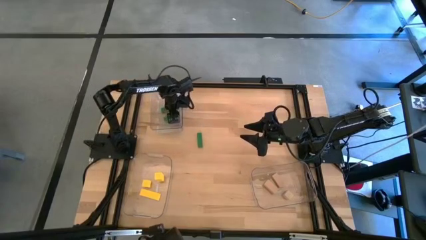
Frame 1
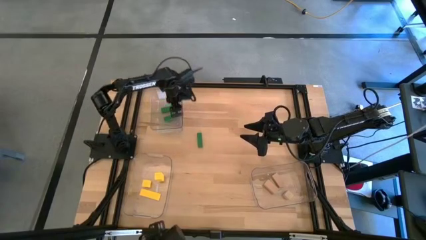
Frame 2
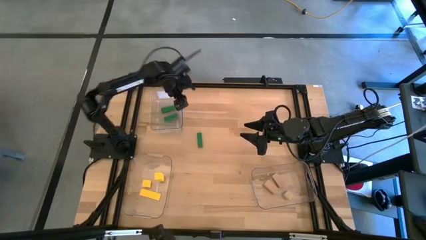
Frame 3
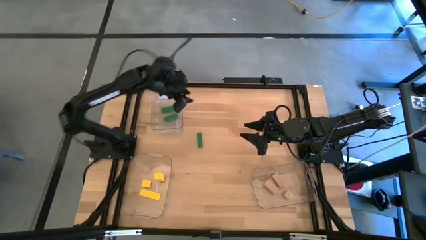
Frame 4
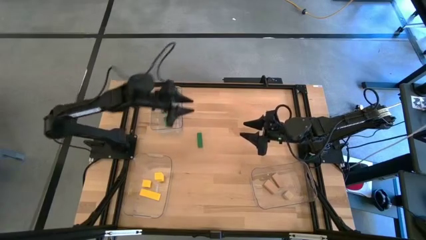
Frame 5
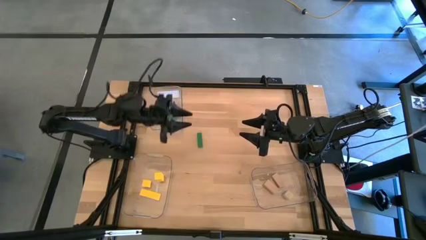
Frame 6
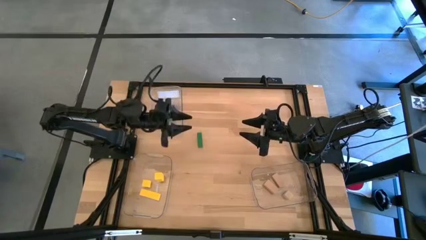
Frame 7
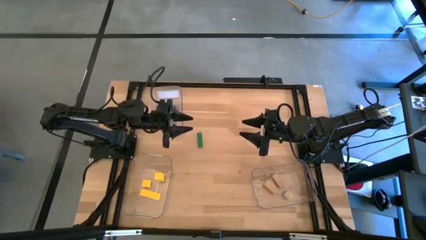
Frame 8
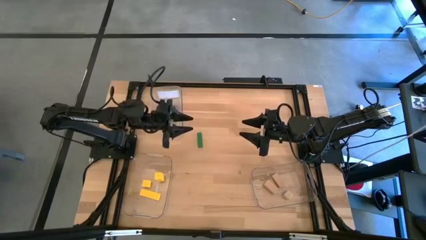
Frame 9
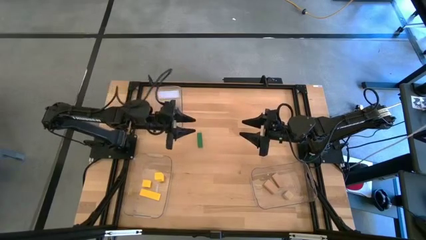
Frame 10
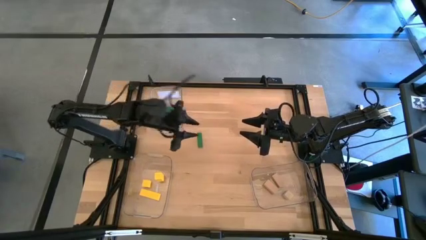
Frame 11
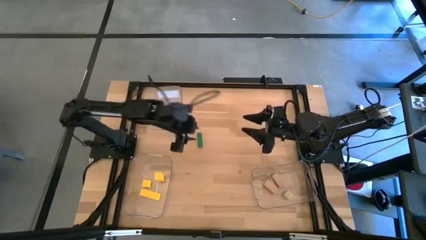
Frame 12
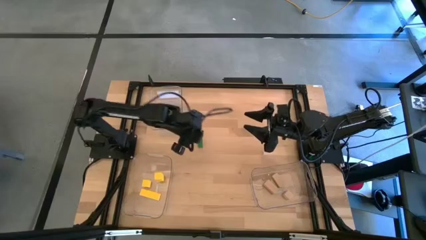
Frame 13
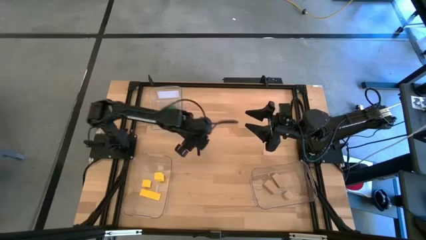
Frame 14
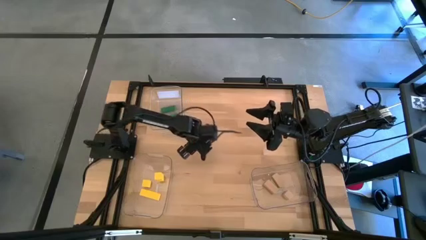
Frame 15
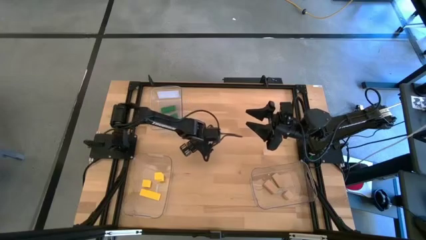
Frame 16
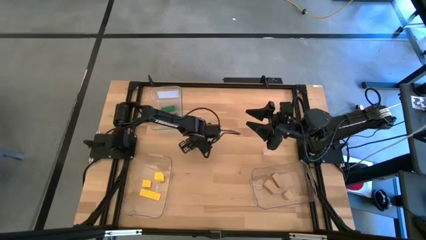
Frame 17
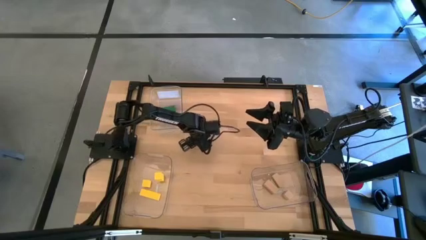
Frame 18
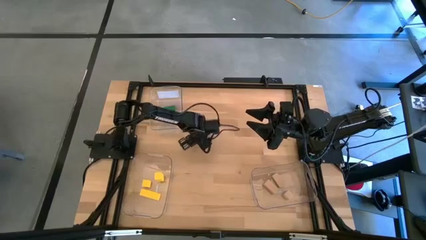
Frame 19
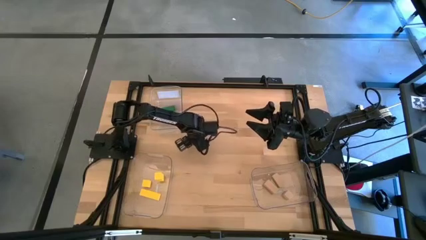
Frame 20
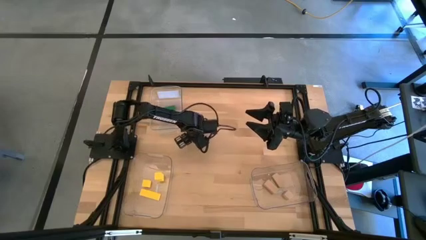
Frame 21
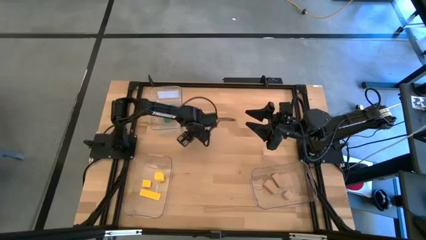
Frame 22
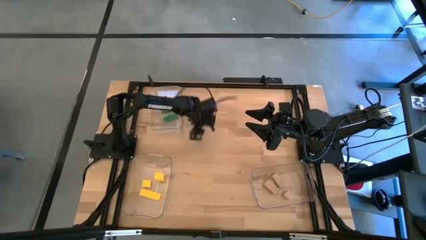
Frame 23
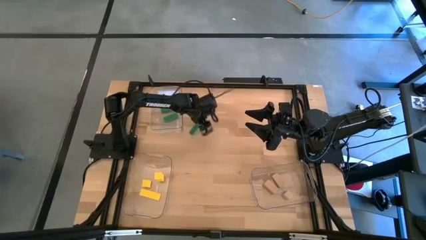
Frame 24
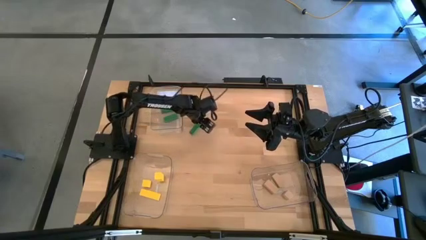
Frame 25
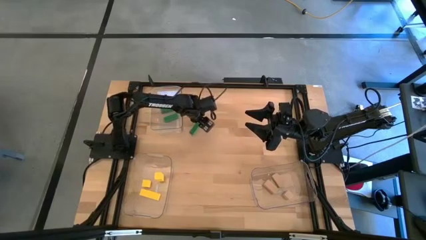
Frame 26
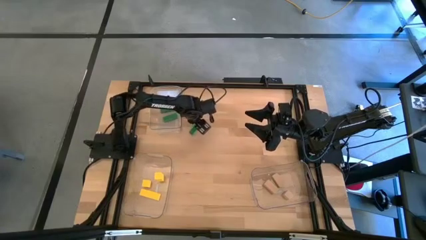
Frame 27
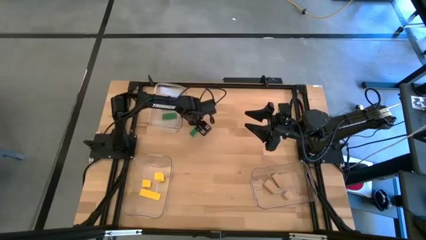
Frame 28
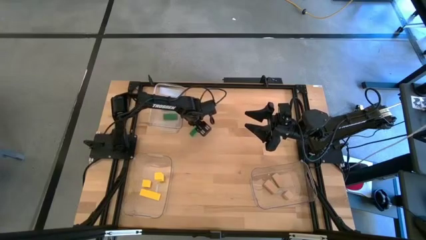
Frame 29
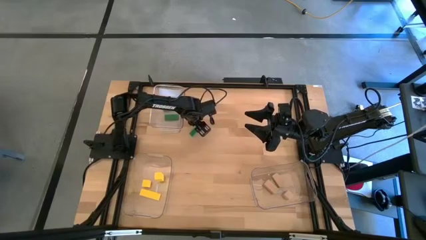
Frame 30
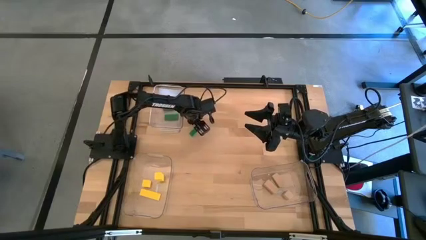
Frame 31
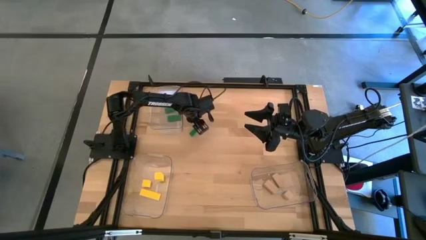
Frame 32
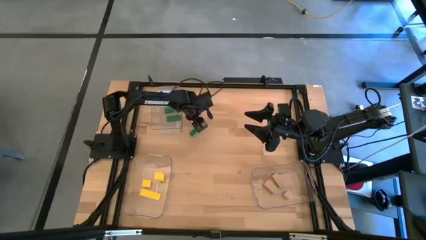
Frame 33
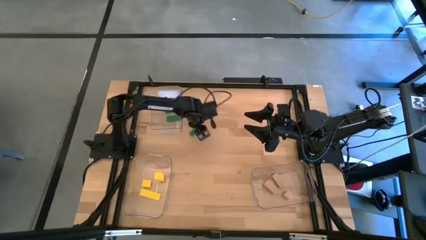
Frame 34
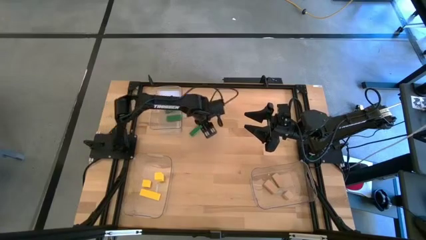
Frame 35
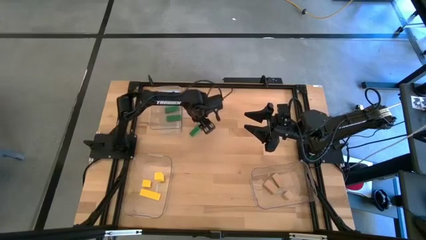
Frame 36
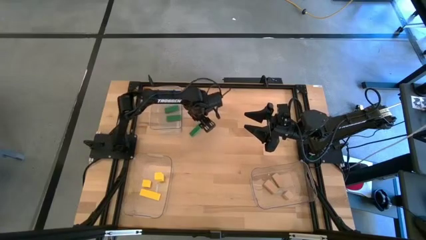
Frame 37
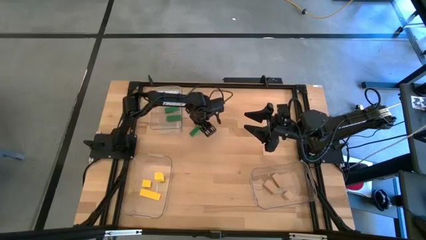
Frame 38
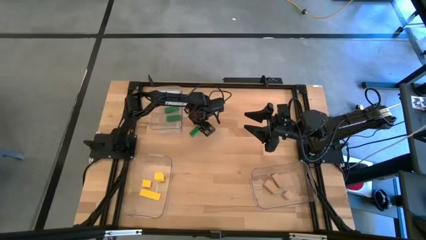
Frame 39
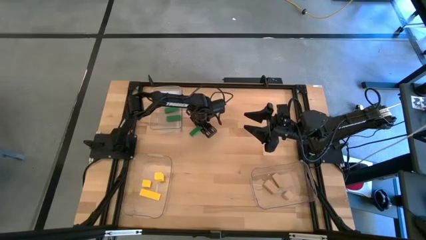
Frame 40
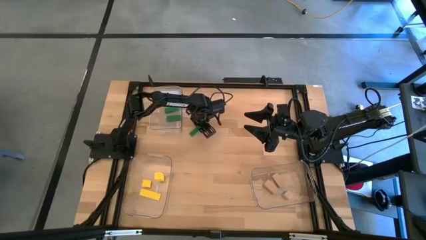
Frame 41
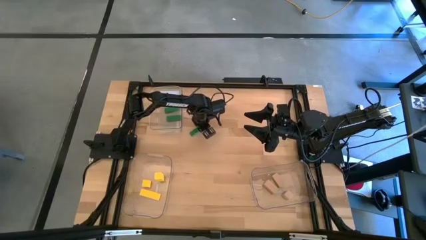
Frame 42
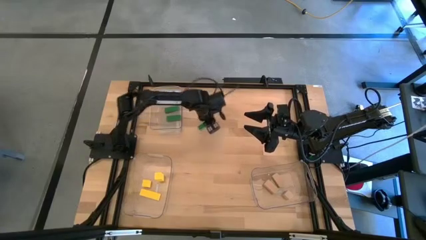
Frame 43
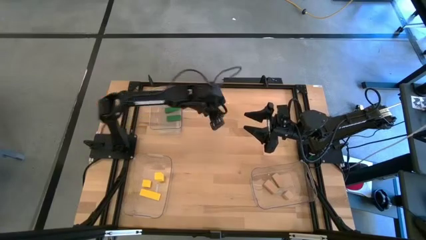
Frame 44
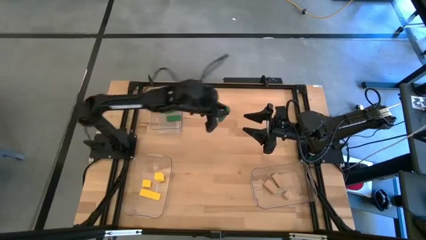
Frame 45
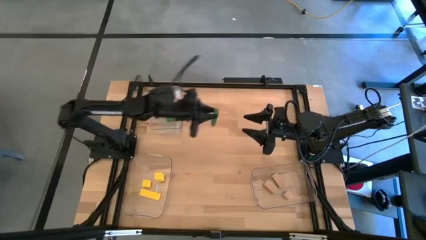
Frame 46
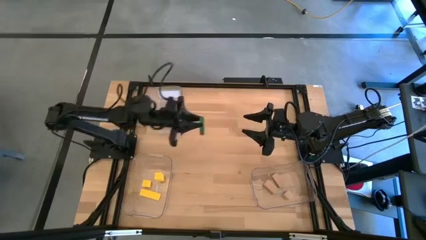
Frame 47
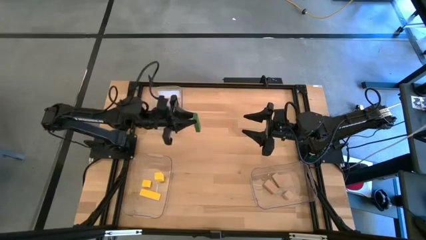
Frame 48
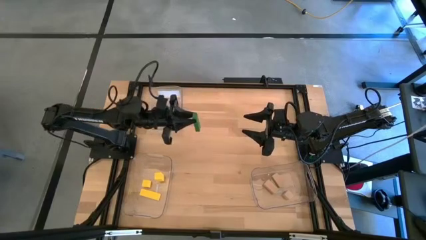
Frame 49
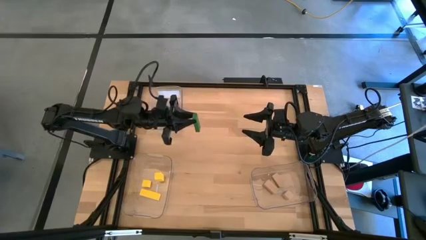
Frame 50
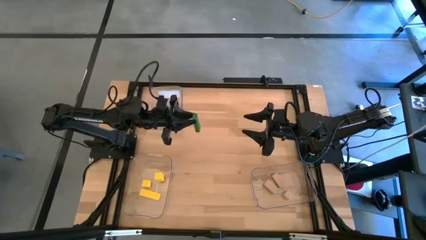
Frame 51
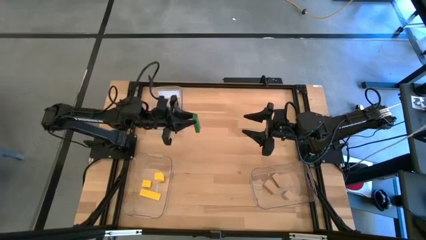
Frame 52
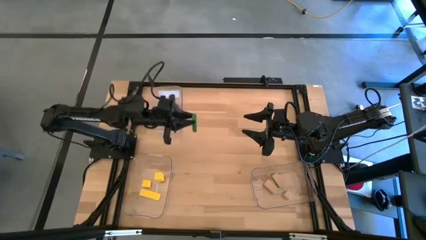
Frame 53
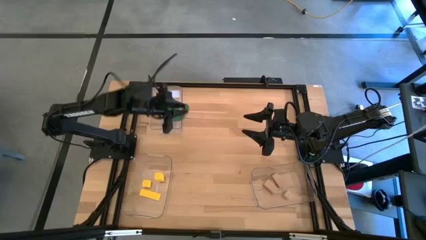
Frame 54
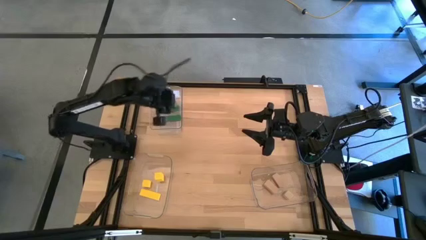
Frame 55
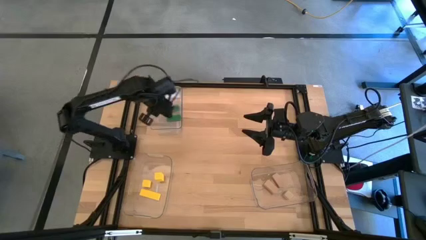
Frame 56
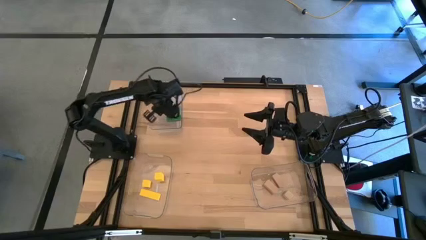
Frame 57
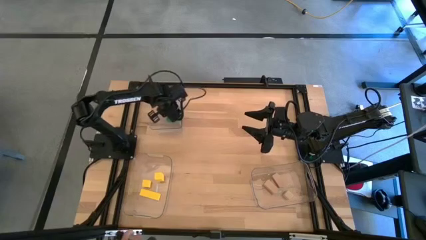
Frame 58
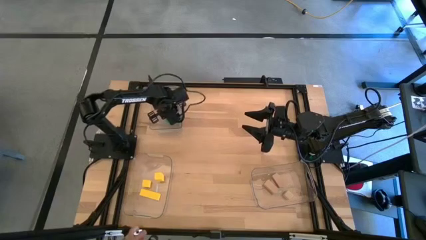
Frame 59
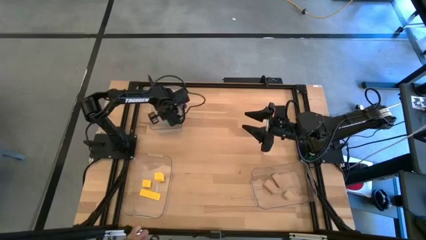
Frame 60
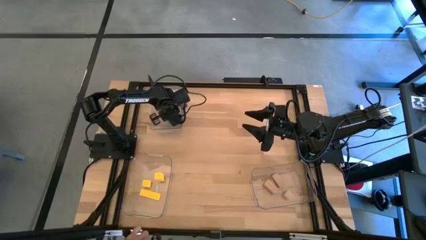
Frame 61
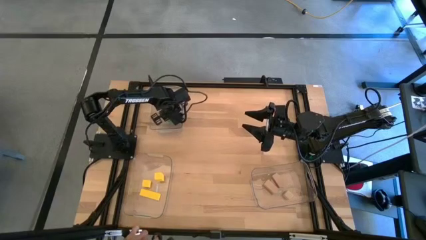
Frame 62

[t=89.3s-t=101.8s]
Task: Sort & place blocks by color
Put the green block into the top left transparent bin

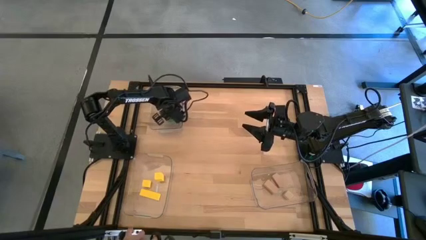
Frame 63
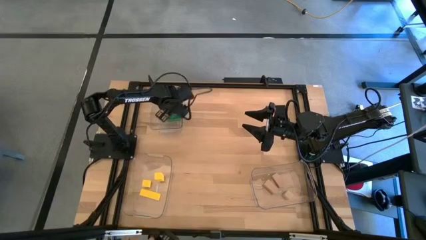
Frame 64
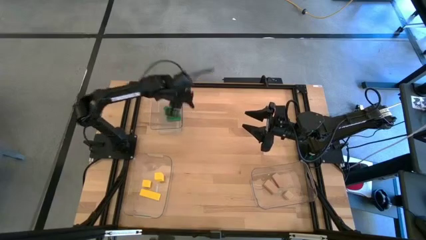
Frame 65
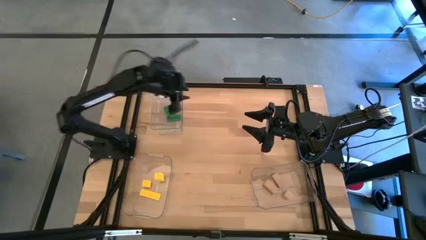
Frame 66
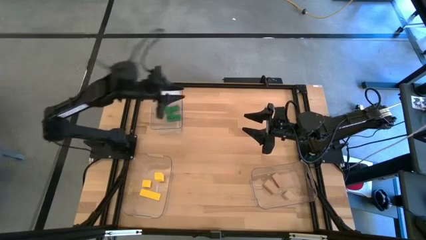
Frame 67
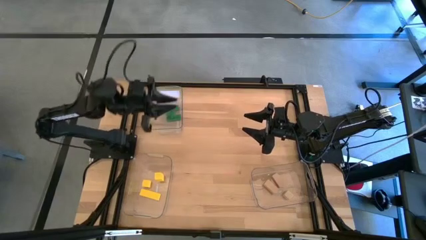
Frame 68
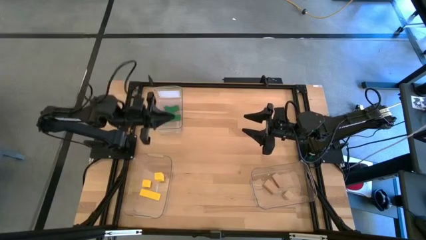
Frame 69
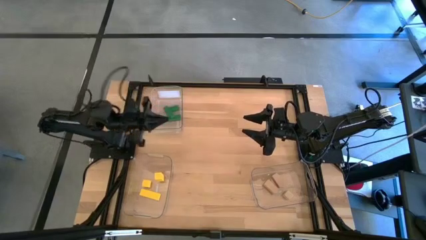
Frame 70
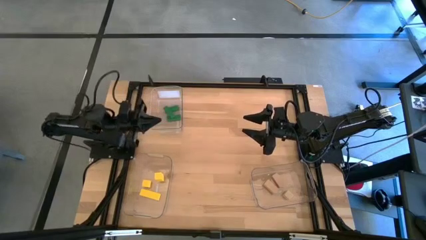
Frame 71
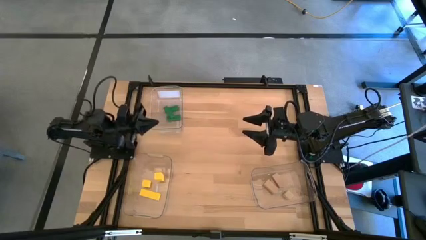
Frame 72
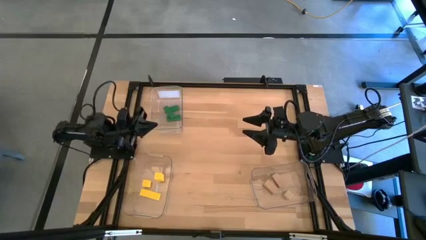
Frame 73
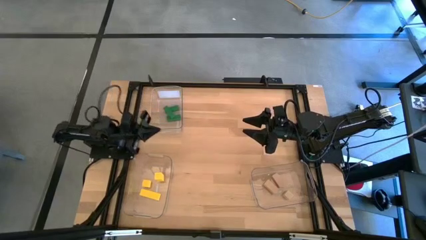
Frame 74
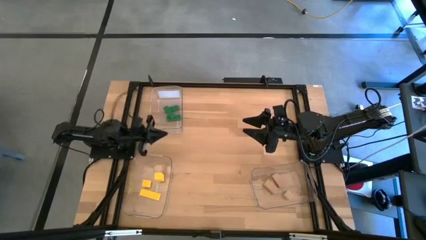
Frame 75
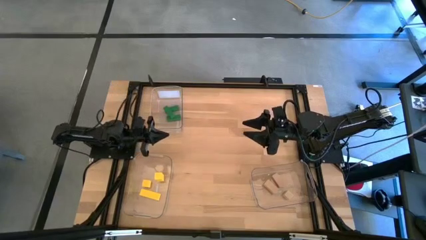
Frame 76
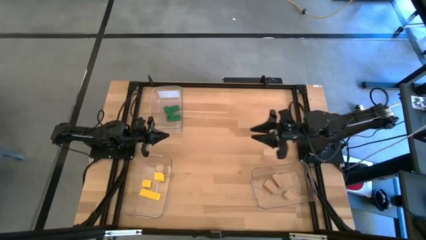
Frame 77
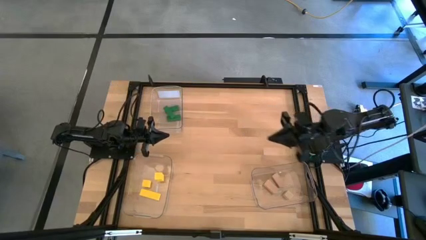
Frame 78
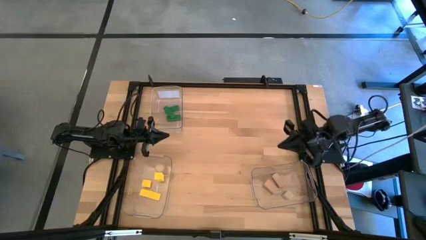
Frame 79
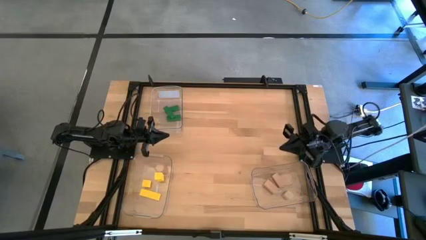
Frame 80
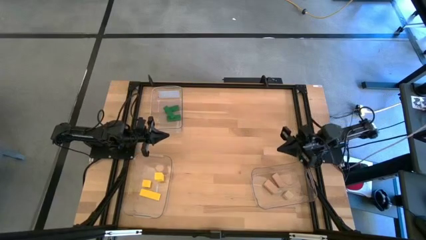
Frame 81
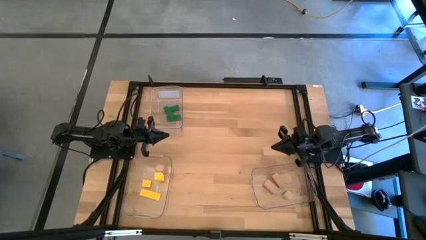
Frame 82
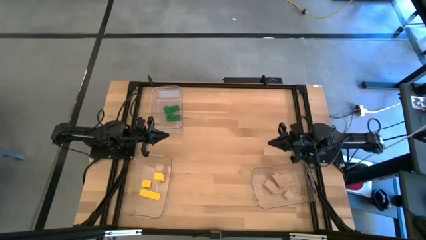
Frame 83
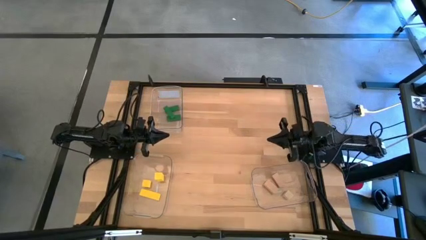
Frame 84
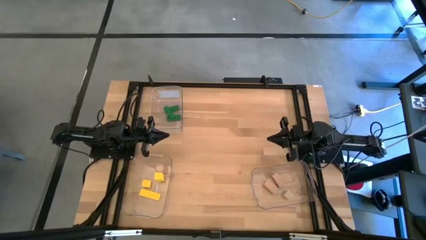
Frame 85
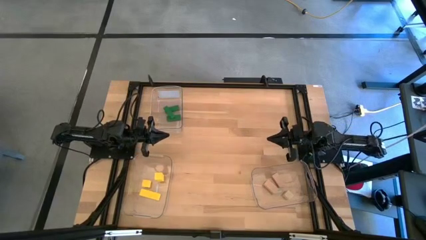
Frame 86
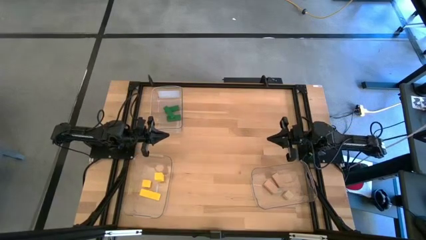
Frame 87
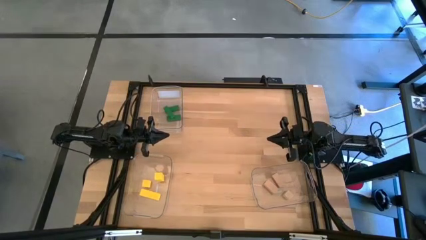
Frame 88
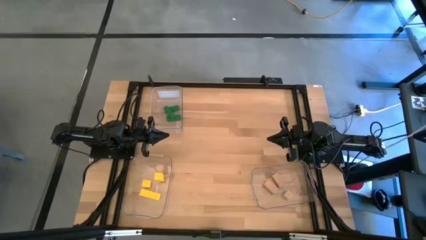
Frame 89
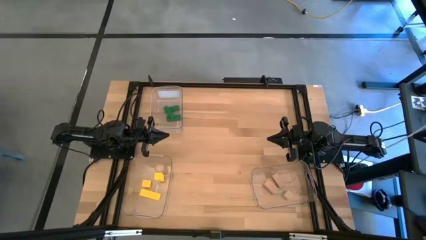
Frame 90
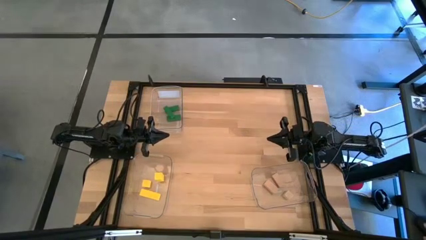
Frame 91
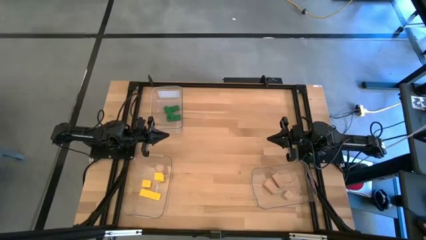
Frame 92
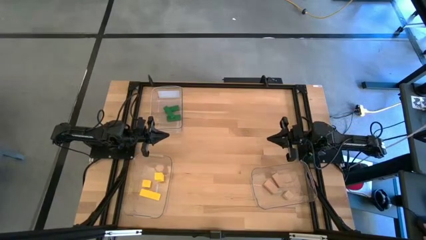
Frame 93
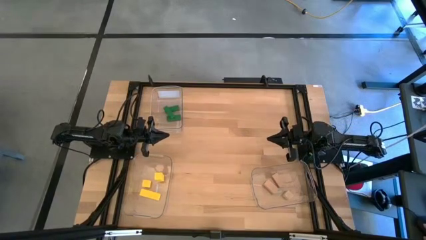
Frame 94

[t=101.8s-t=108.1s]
Return to Home Position
